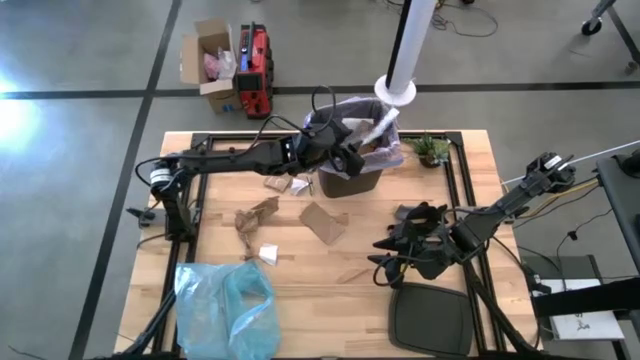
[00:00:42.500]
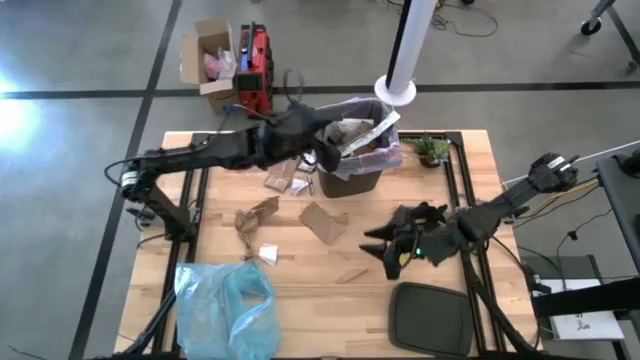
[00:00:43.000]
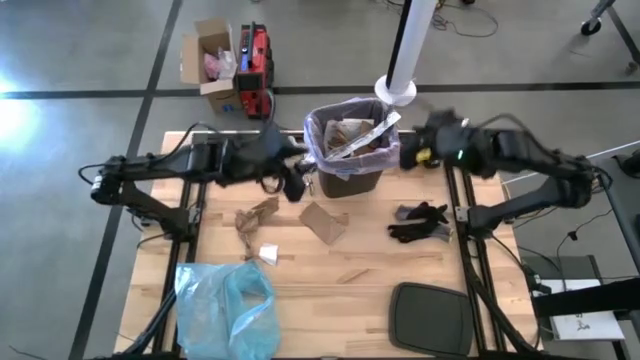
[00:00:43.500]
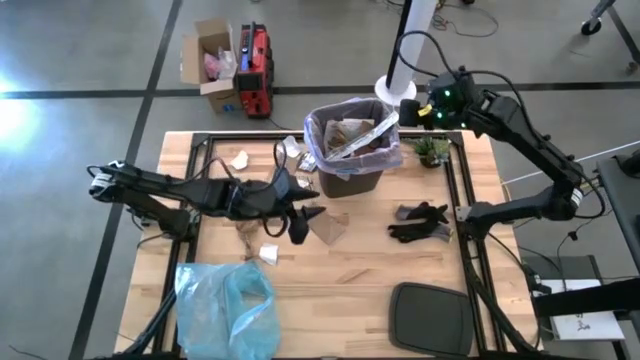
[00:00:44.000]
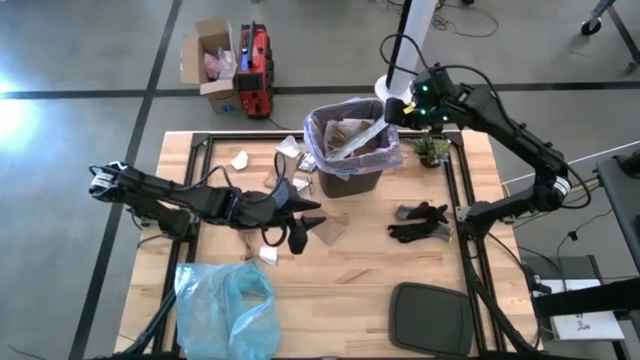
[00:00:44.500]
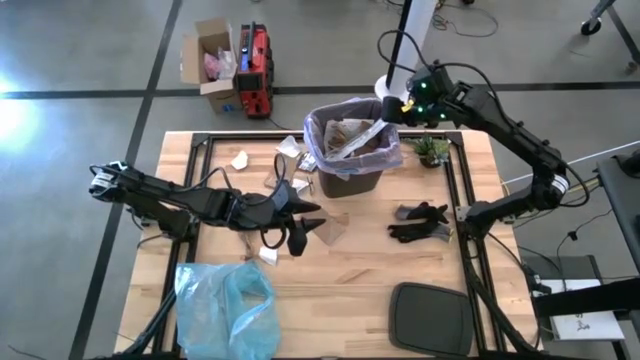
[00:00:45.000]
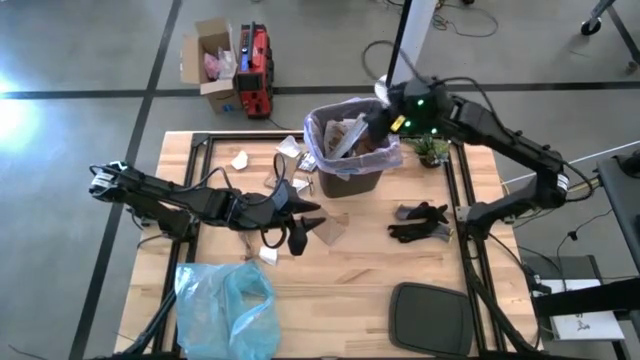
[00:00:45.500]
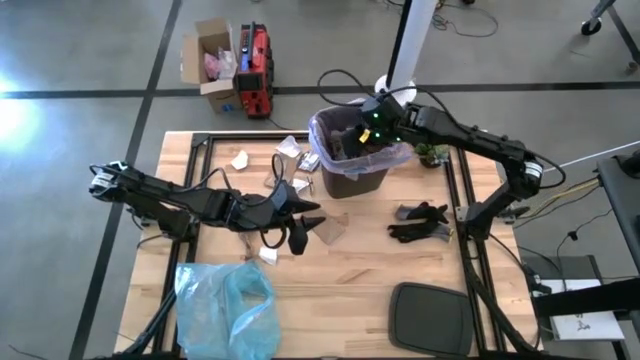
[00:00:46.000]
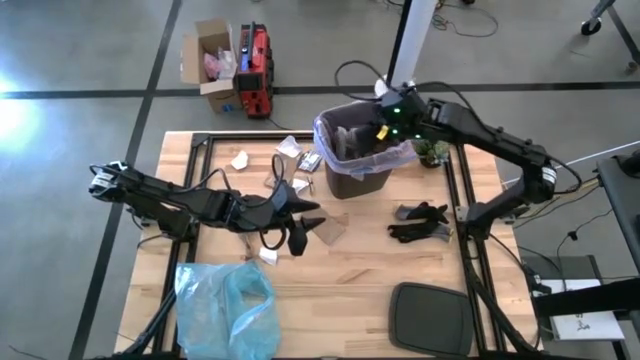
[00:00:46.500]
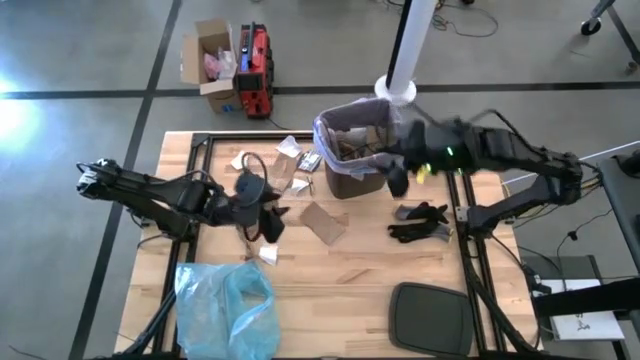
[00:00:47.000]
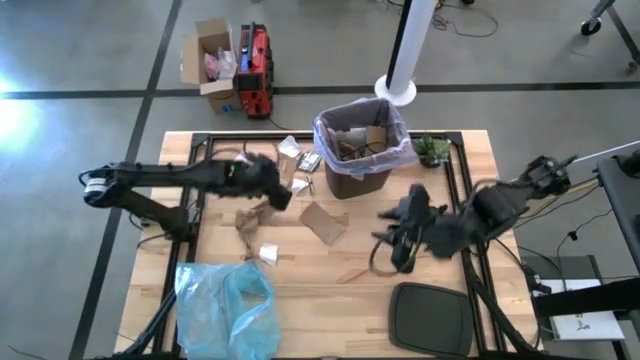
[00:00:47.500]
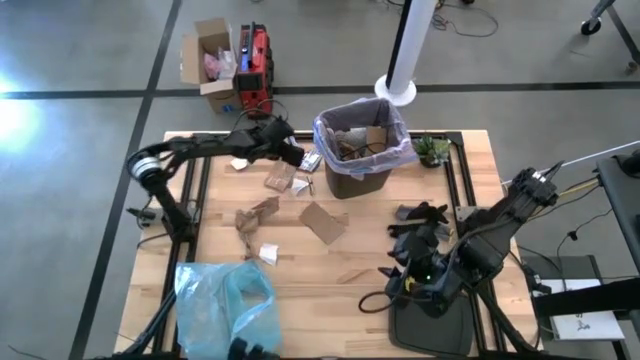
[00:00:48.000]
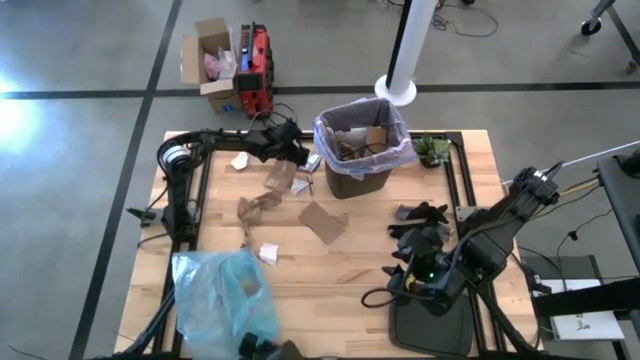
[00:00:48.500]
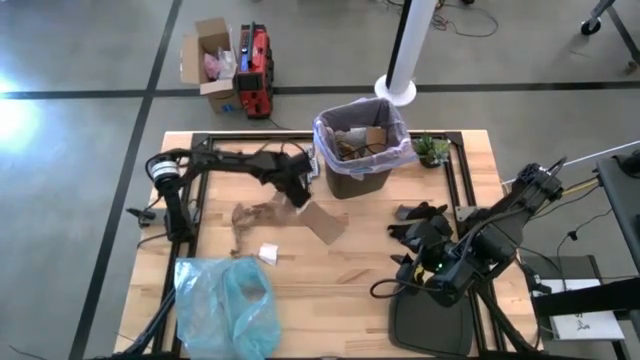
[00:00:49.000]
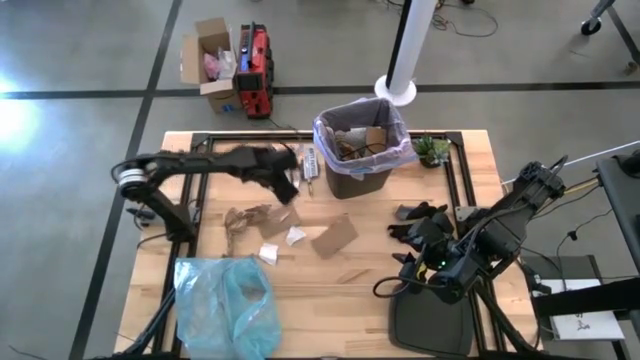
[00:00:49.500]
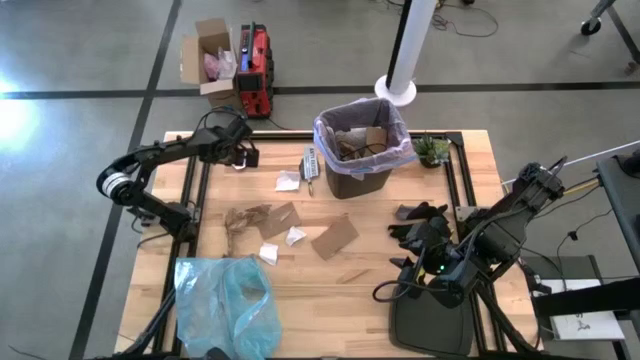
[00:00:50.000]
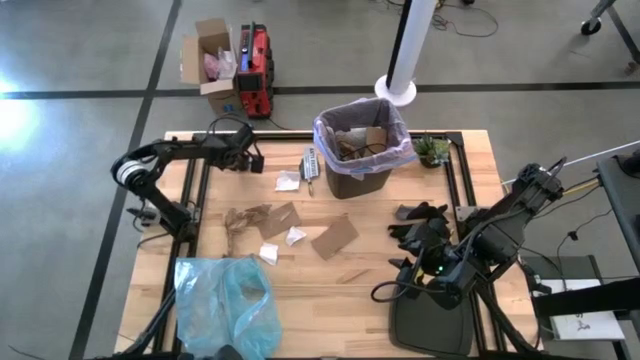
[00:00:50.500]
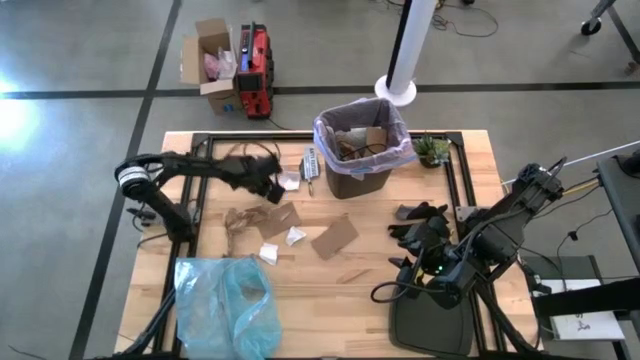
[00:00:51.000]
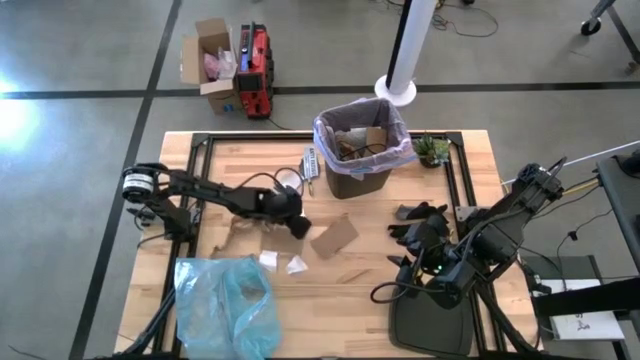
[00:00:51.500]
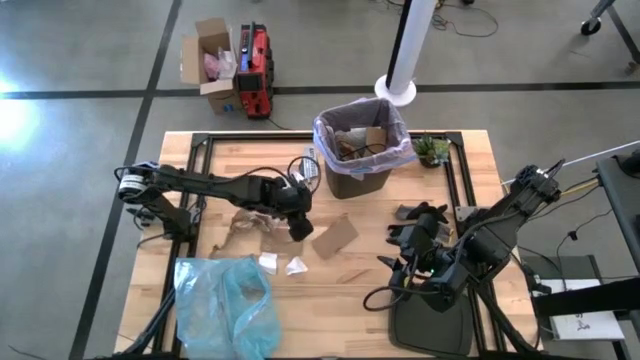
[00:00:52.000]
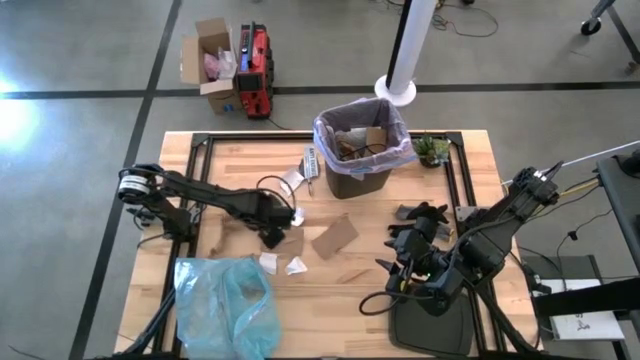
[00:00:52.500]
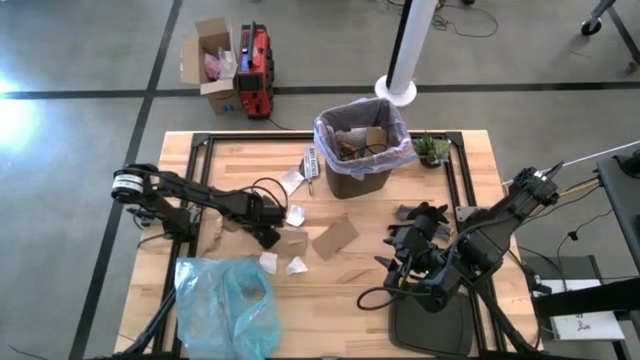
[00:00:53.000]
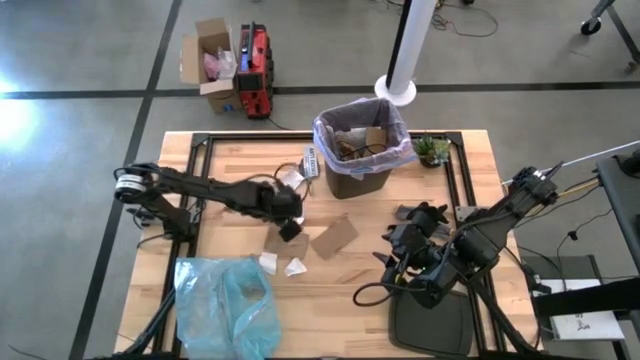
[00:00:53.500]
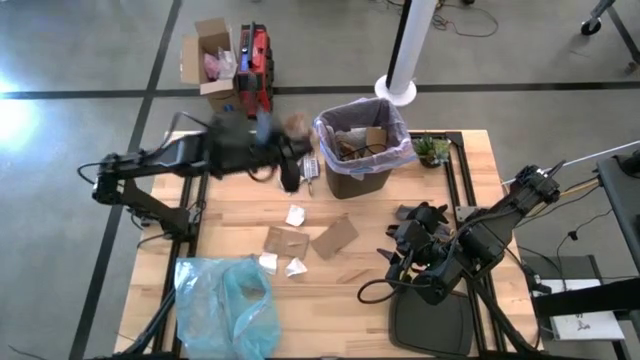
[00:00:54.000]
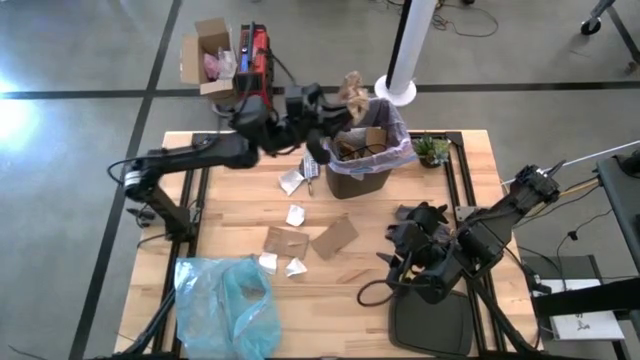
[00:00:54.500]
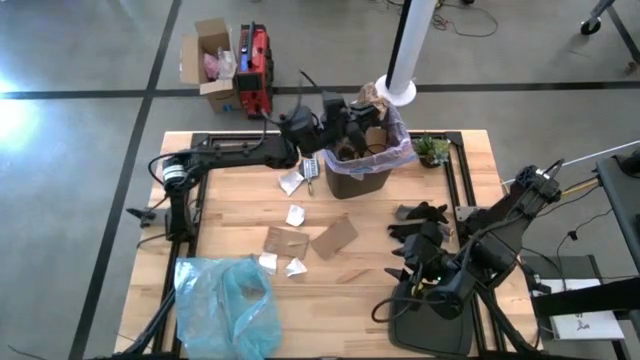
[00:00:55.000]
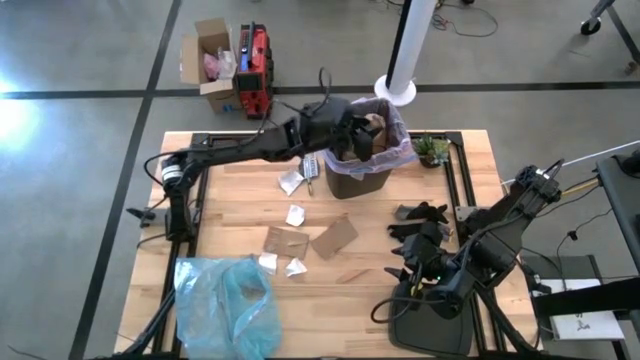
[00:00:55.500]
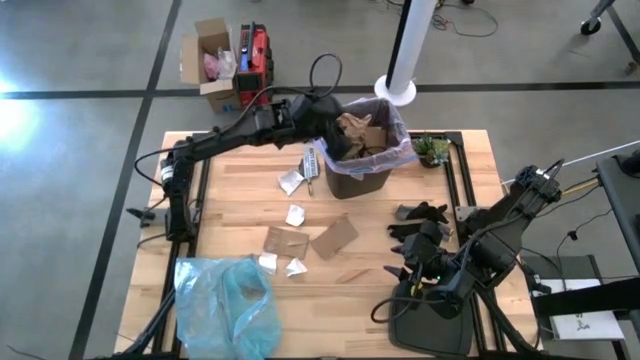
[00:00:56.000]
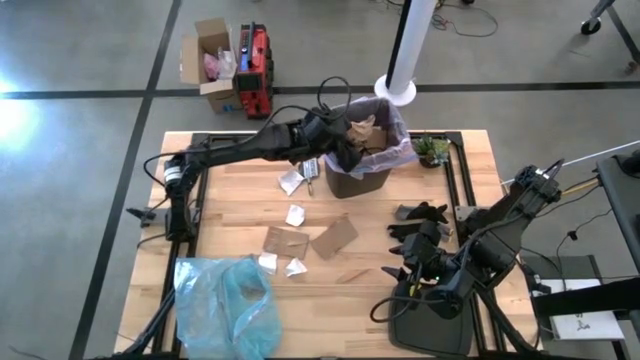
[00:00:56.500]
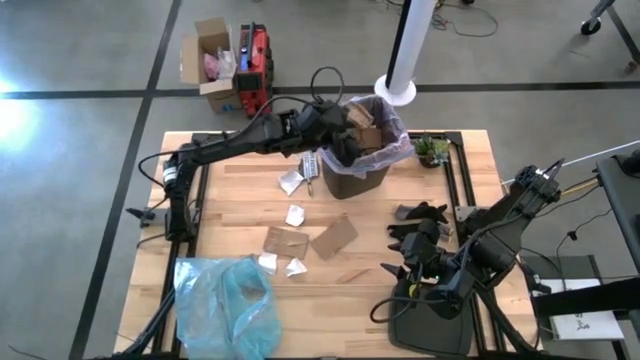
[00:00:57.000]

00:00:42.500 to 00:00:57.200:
Task: place trash/remove bag and relplace
Put the brown paper napkin into the trash bin

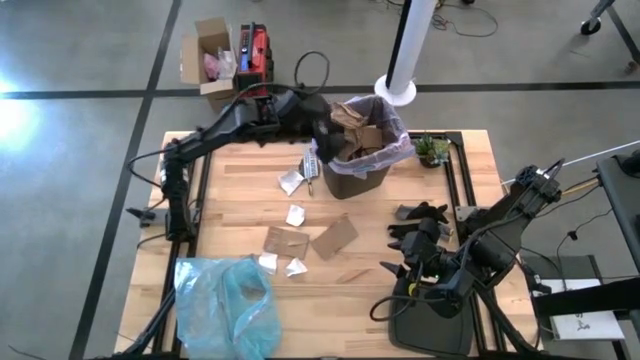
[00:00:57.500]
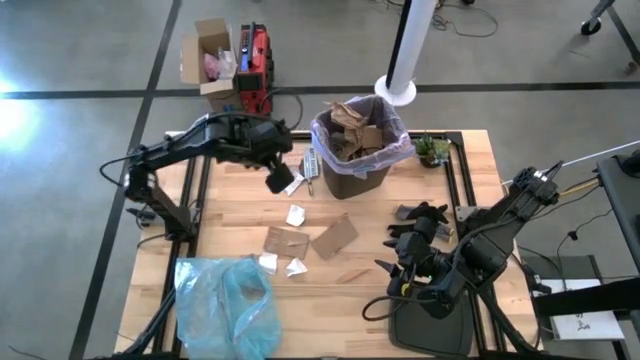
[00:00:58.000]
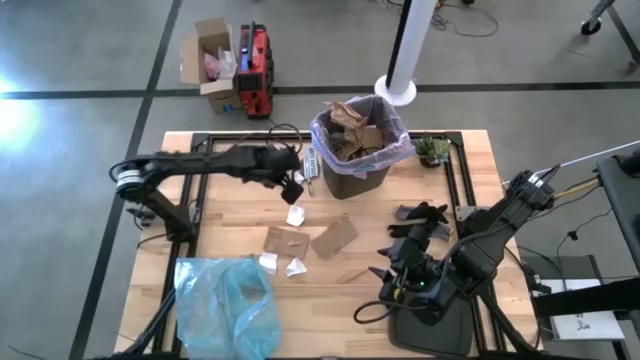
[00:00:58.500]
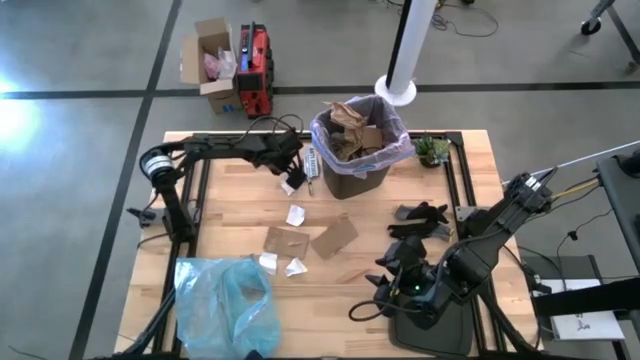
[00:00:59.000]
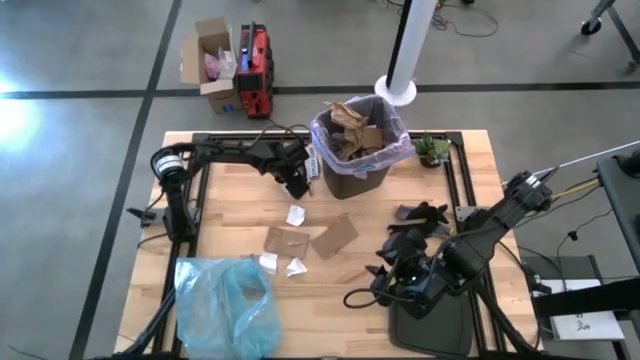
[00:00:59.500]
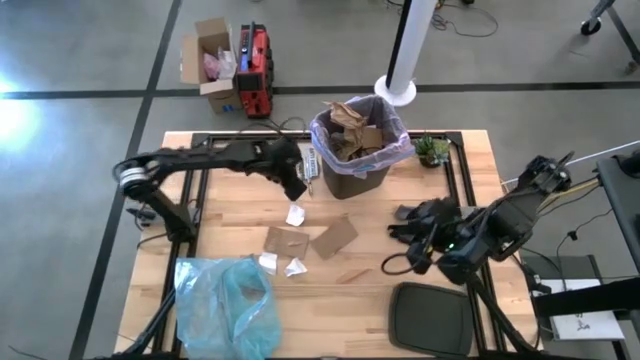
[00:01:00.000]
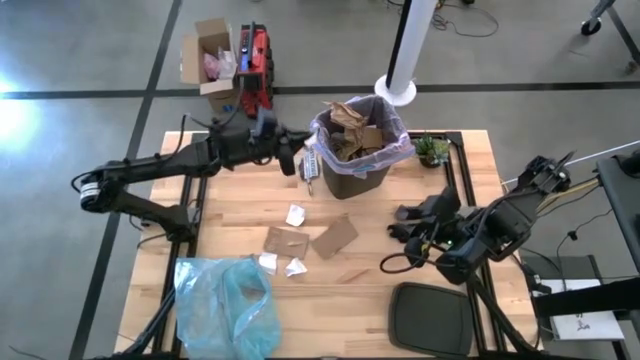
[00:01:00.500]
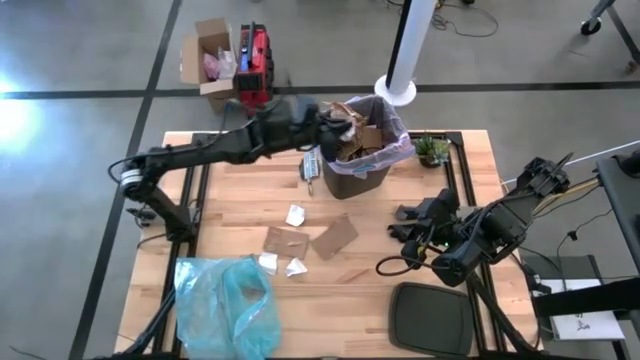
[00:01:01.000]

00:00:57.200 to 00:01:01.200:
Put the white paper into the trash bin

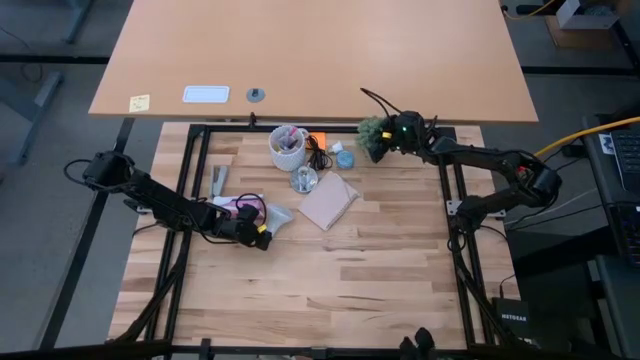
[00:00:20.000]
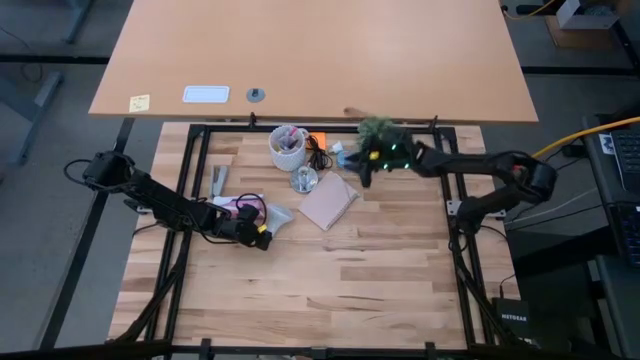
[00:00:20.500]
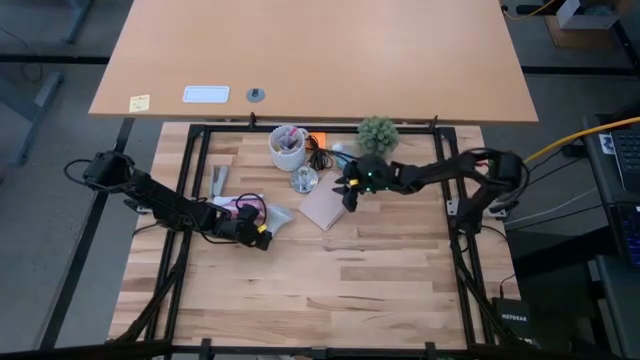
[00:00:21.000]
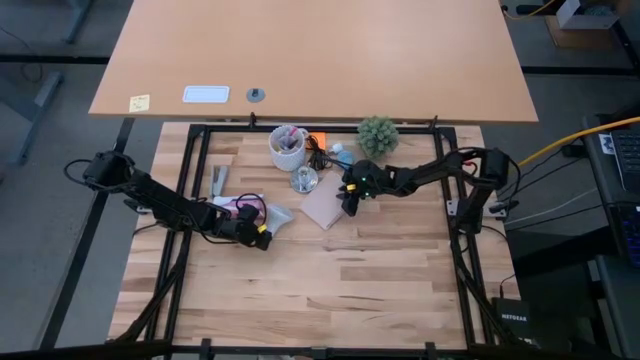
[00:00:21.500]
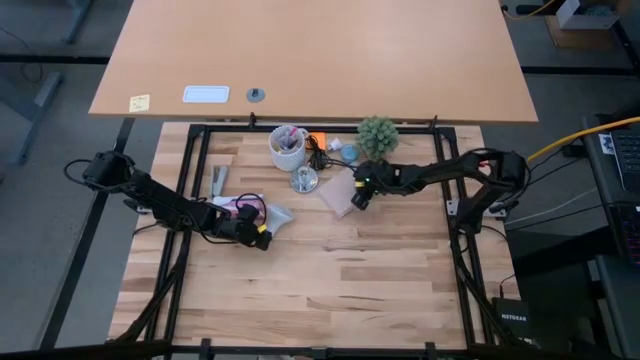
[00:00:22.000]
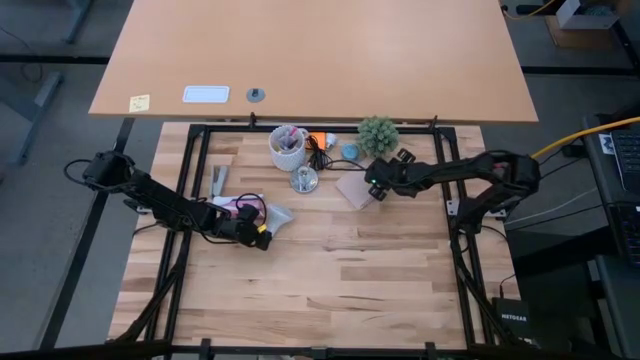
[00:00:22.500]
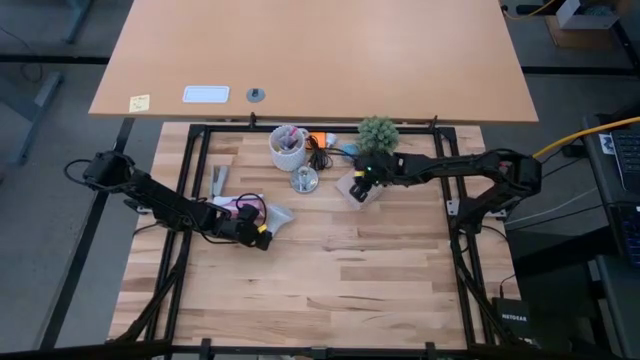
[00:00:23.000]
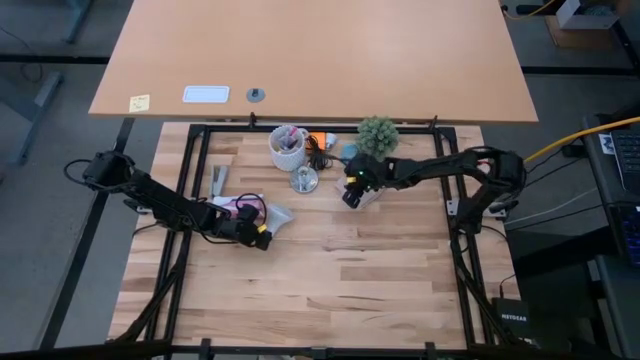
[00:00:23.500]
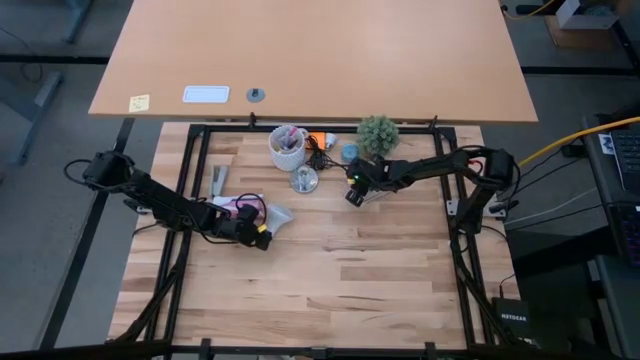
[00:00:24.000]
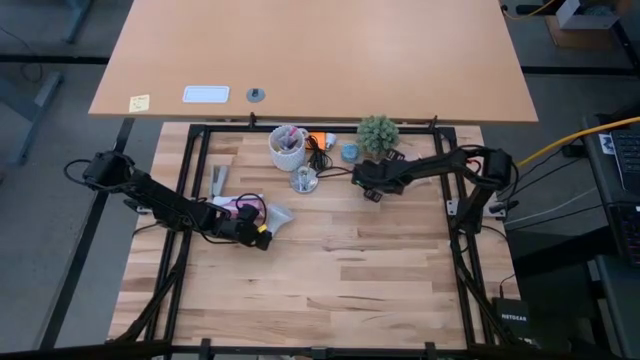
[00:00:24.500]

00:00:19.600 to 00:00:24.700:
Task: Screw lightbulb
Move the brown notebook to the top right of the table
